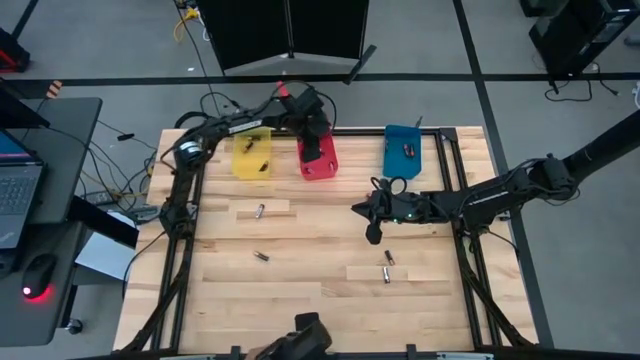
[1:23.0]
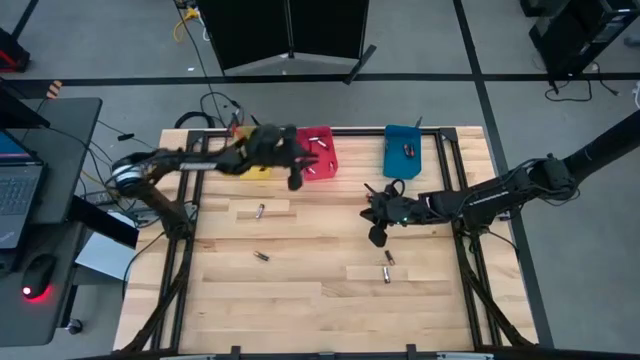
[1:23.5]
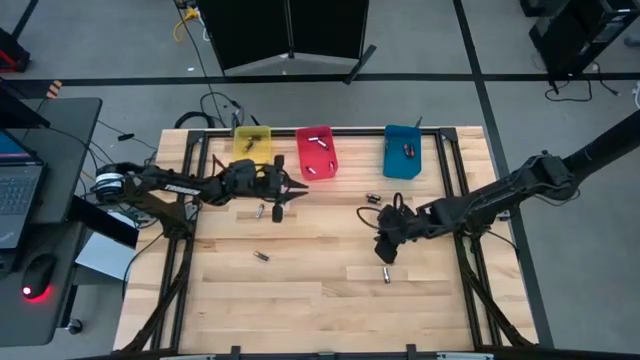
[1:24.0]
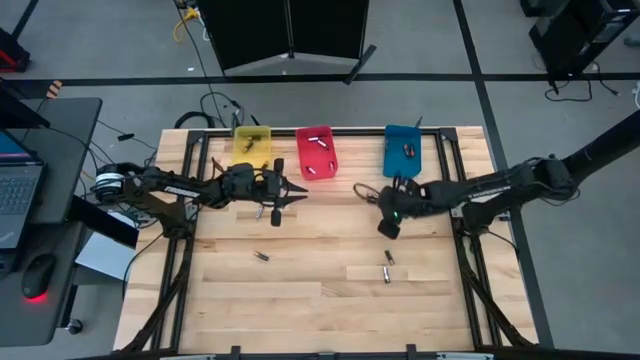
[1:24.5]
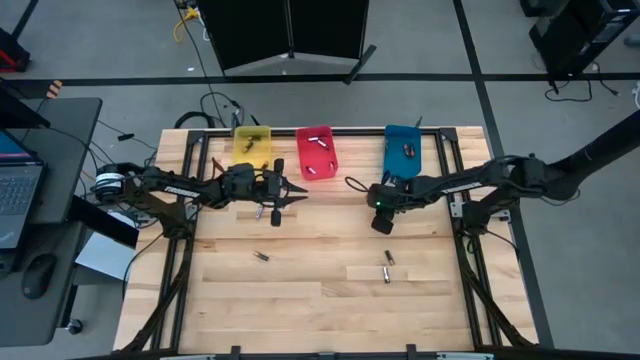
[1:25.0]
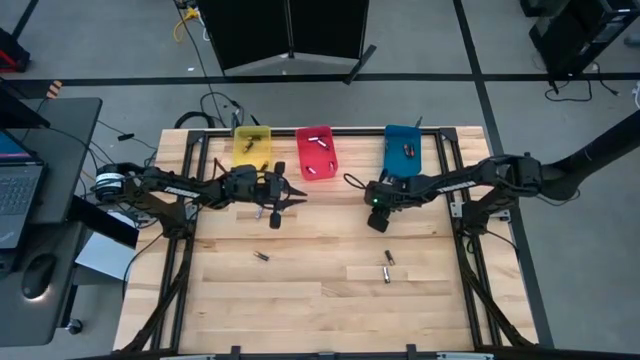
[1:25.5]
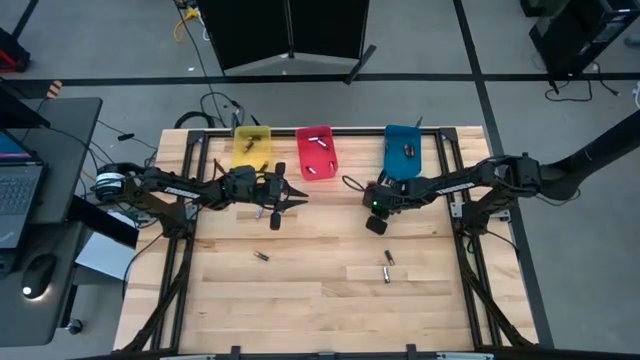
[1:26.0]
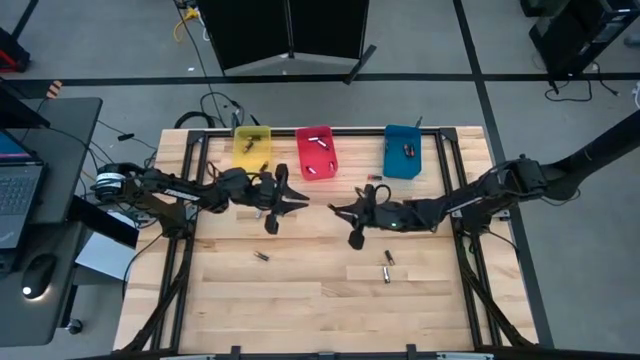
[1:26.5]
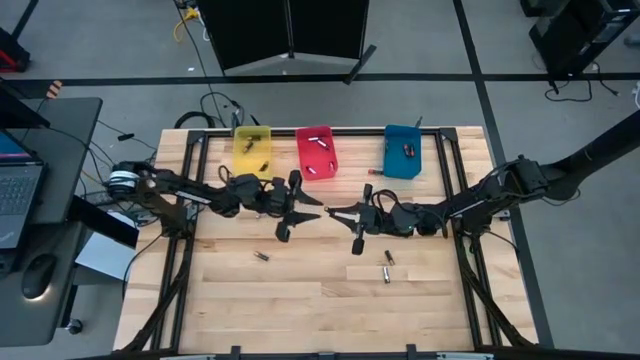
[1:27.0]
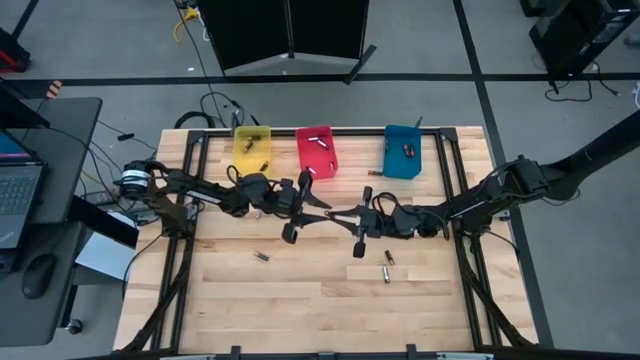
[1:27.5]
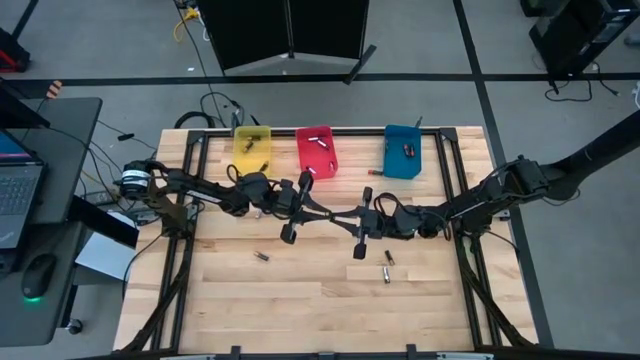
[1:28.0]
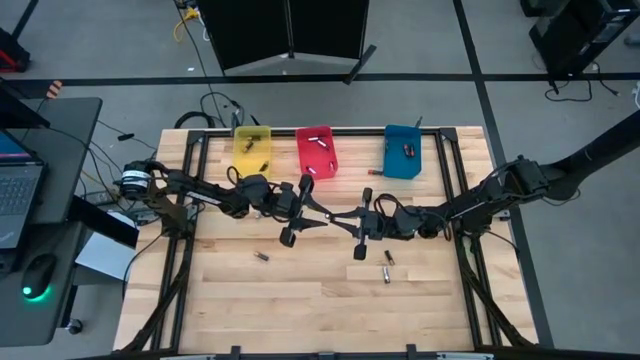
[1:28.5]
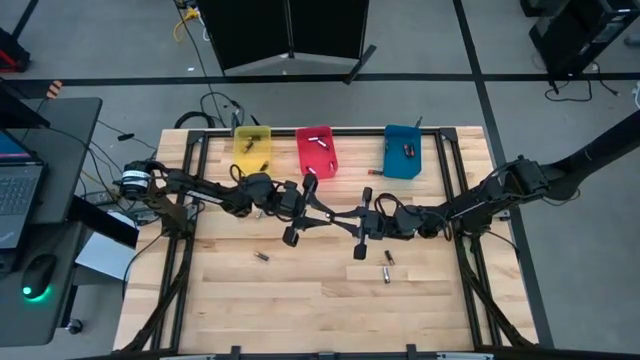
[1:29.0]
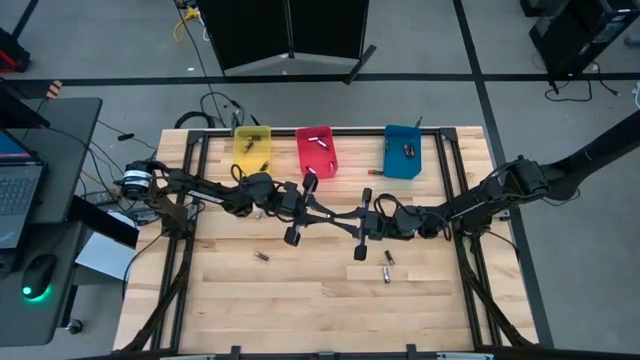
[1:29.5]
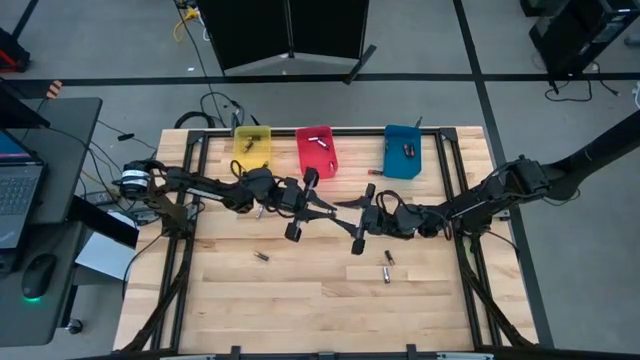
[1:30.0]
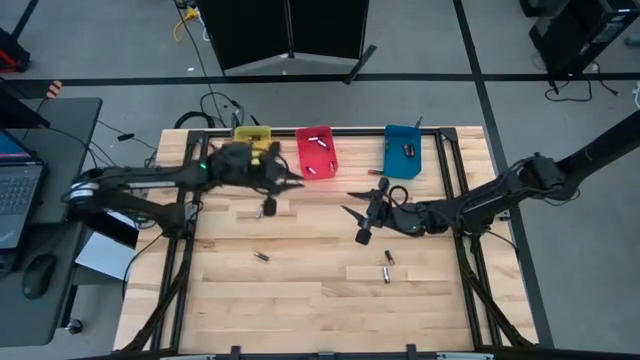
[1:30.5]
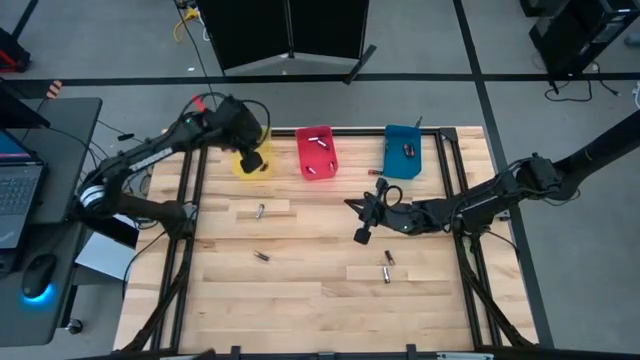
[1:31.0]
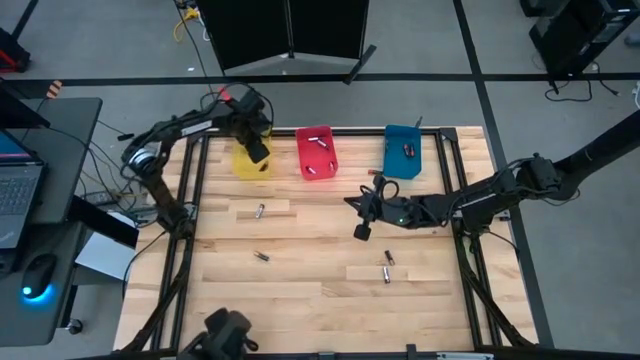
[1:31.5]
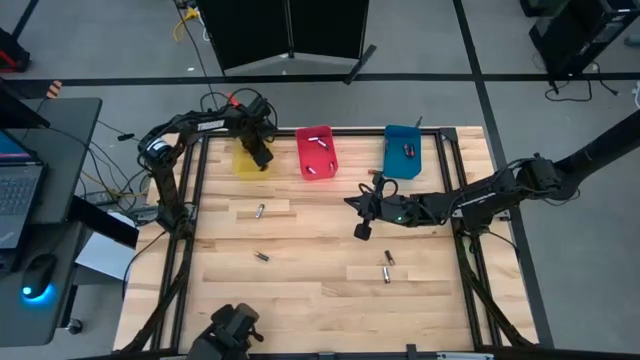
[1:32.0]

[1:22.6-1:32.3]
Task: Sort batteries
Put the top brown battery into the yellow bin

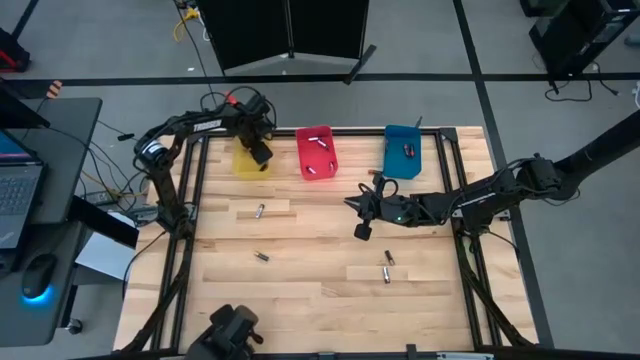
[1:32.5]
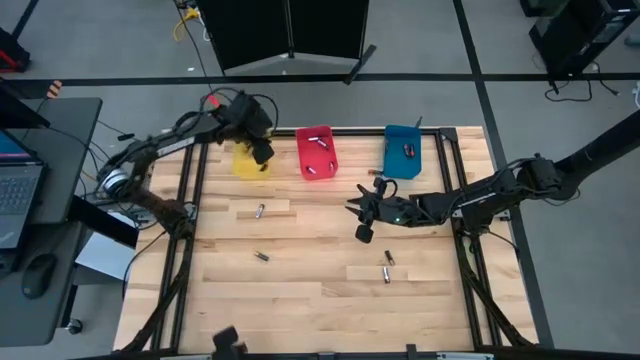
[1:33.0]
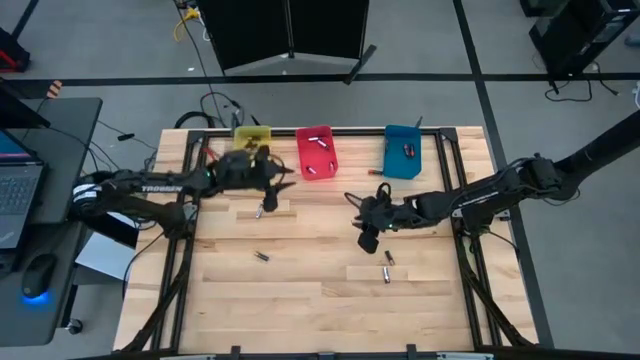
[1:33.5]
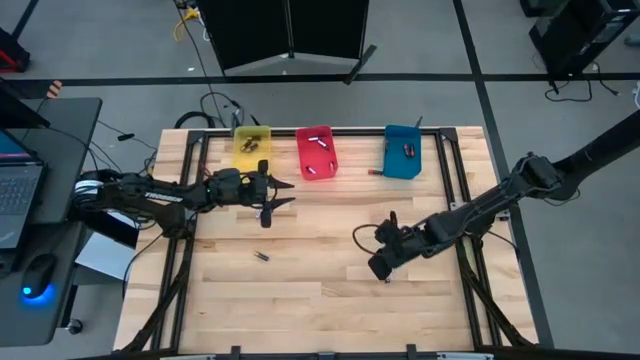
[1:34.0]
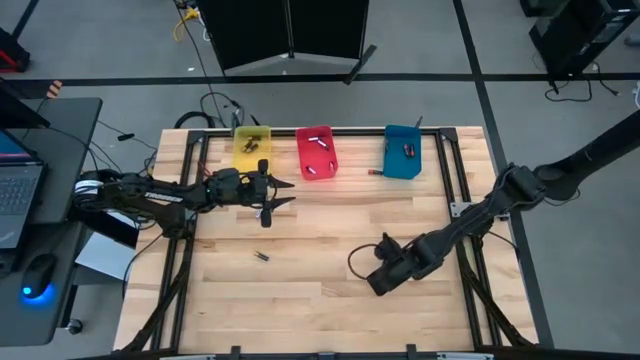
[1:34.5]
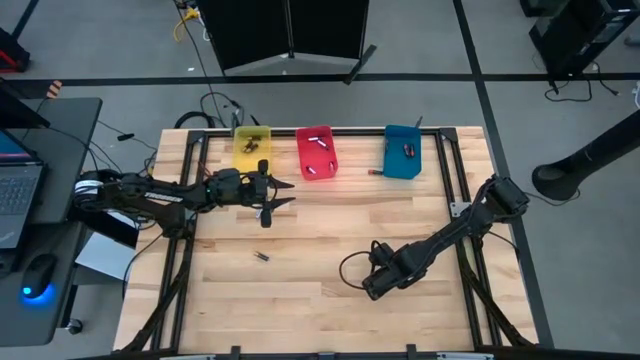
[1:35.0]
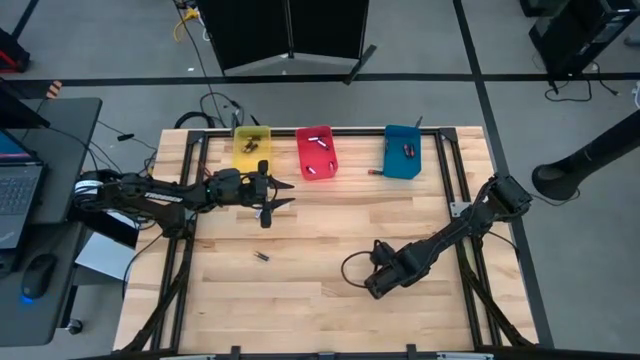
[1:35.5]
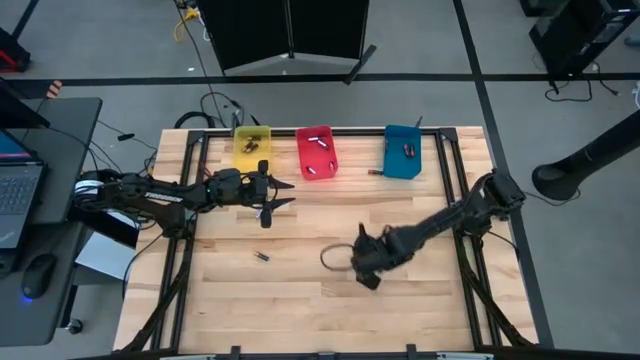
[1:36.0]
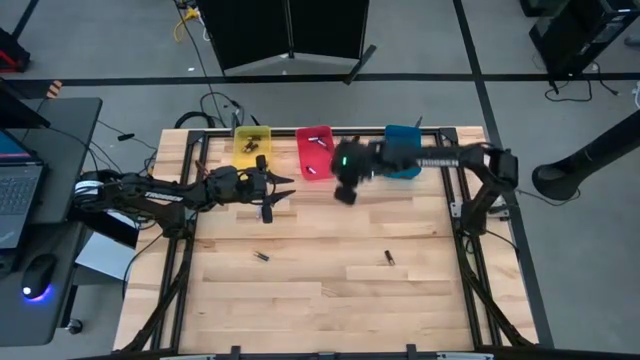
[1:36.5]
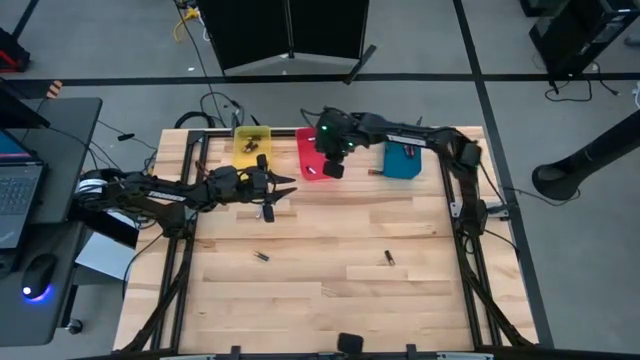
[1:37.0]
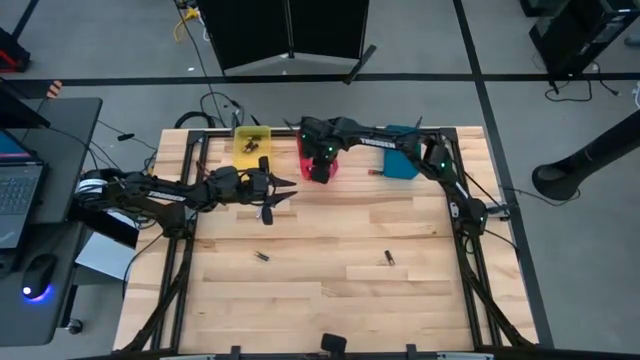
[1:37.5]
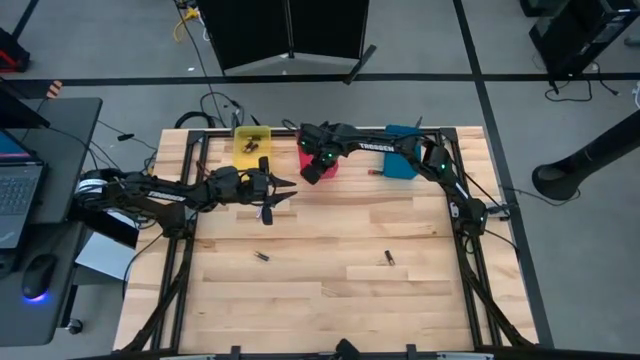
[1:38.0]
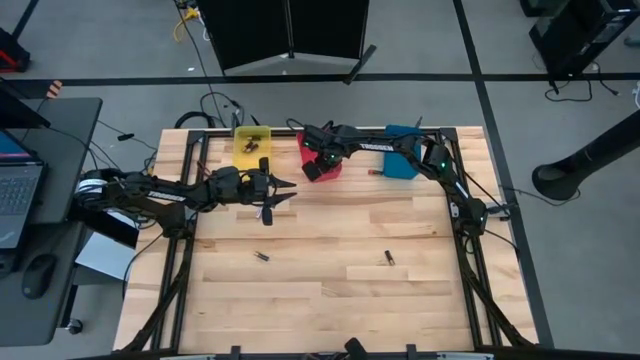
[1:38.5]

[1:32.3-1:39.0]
Put the bottom silver battery into the red bin

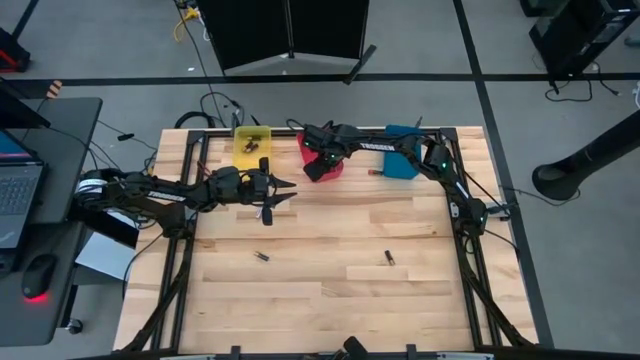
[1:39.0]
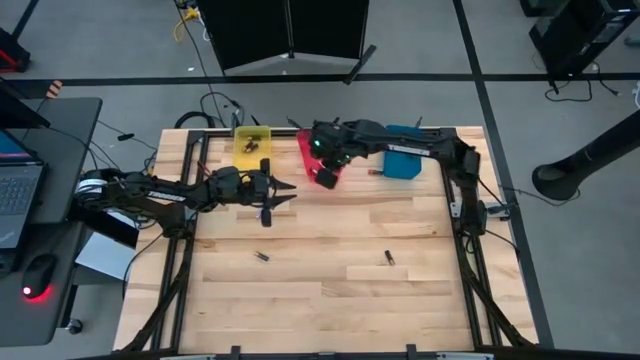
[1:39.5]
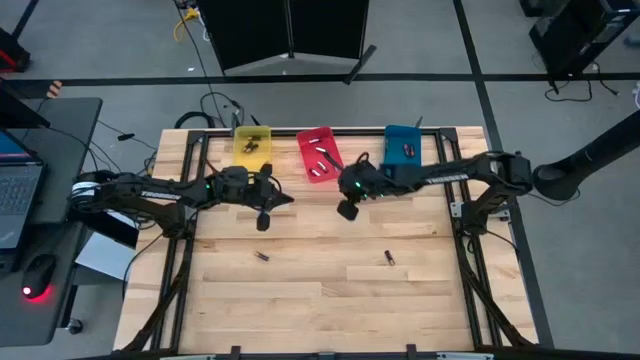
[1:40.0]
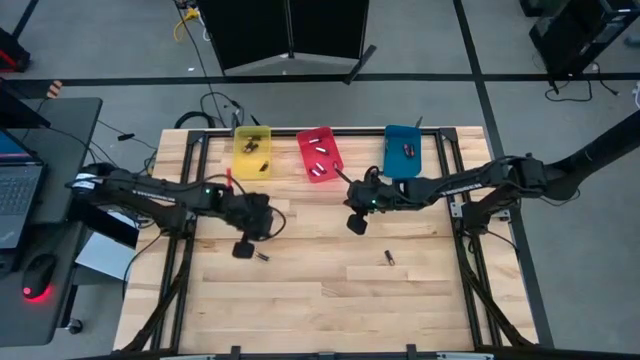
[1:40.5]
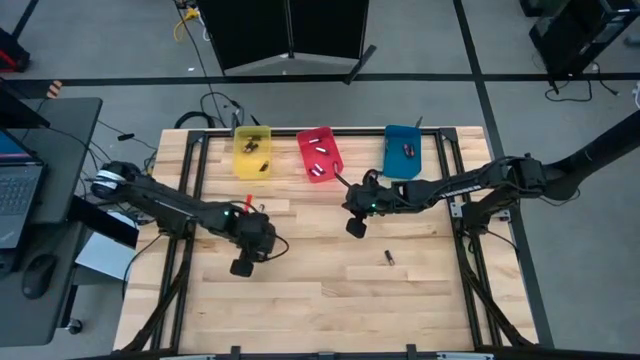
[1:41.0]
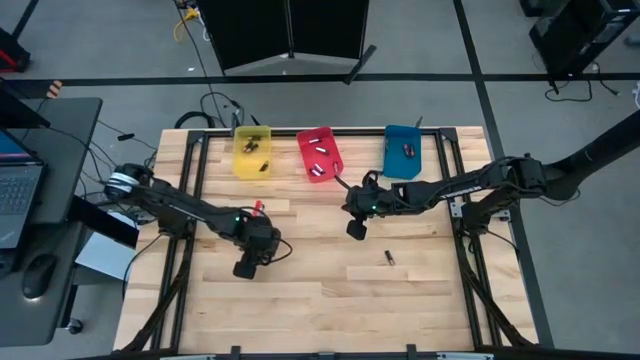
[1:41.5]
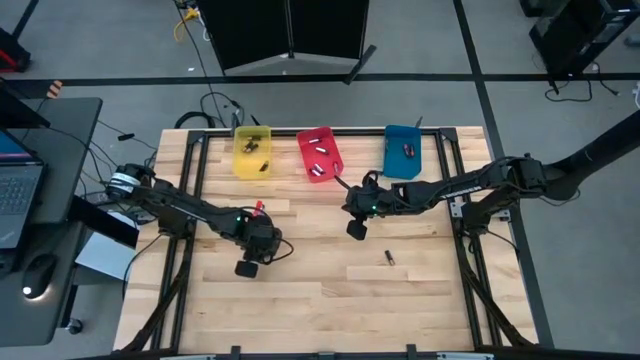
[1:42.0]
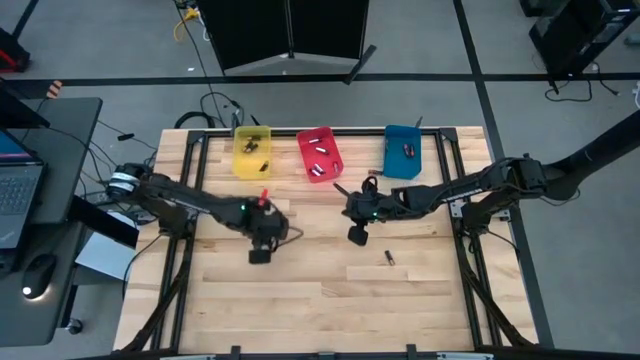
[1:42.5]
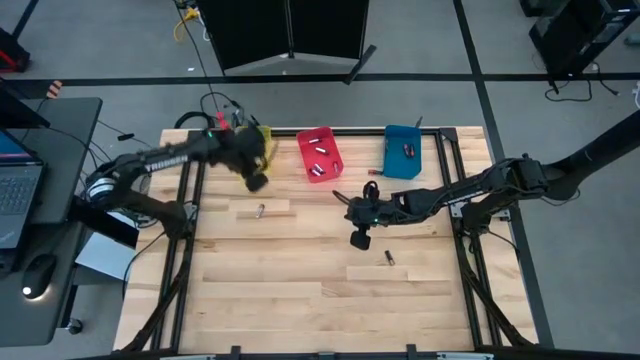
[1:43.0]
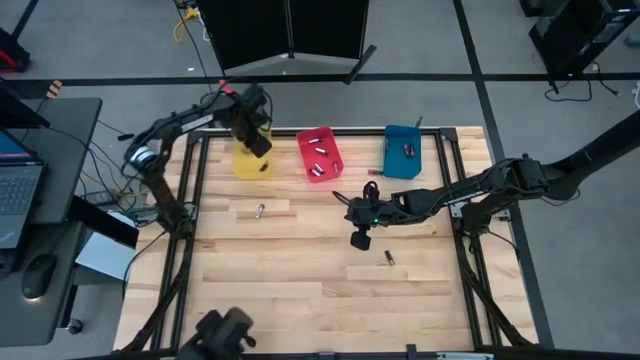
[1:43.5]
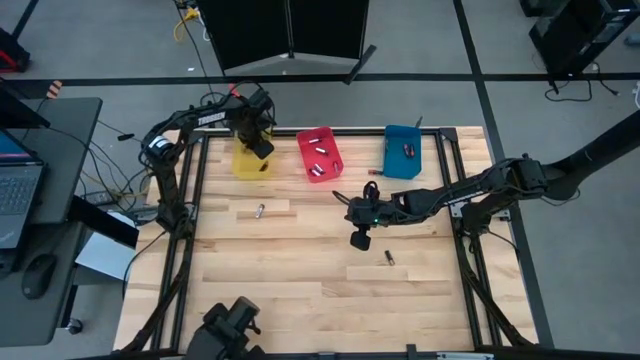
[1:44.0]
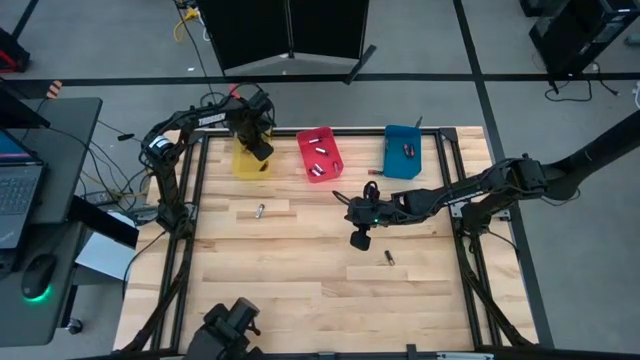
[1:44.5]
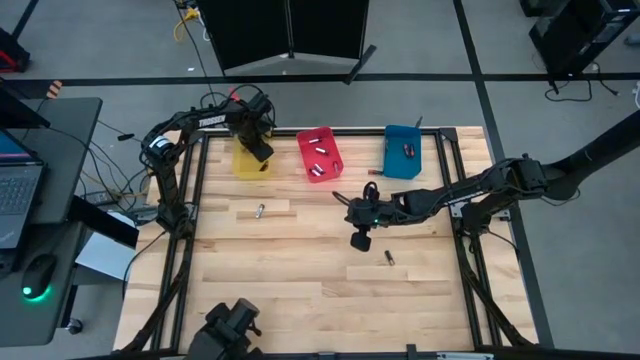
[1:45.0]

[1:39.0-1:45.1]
Put the left brown battery into the yellow bin
